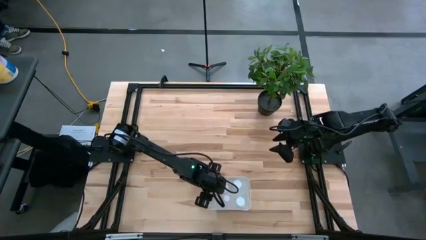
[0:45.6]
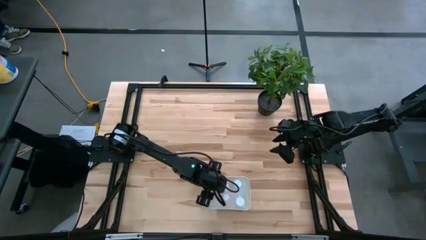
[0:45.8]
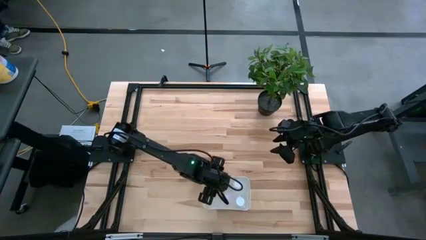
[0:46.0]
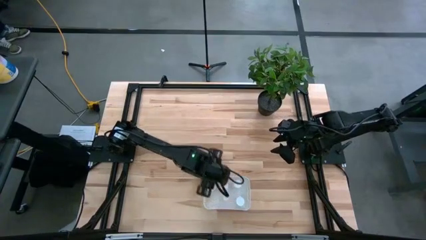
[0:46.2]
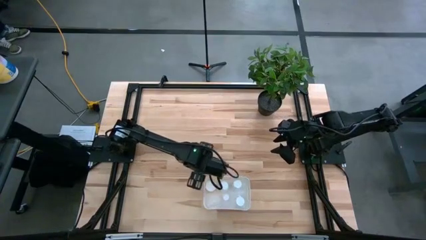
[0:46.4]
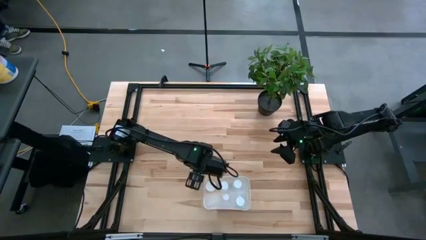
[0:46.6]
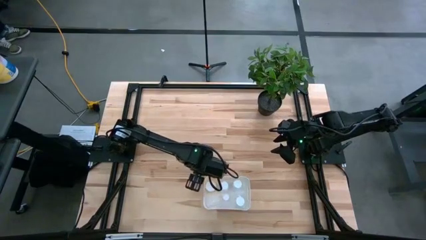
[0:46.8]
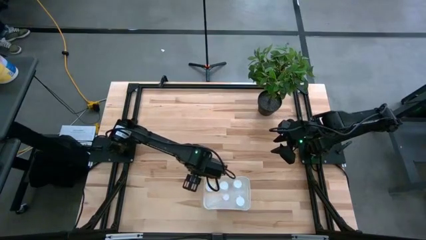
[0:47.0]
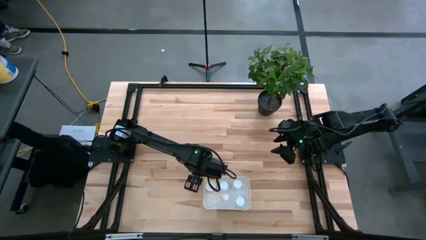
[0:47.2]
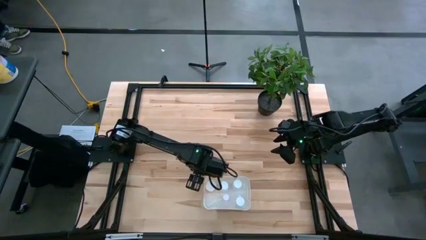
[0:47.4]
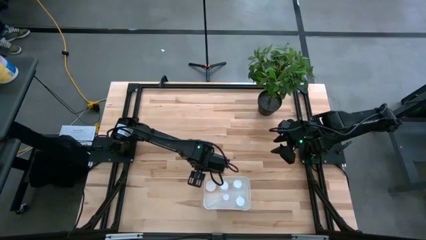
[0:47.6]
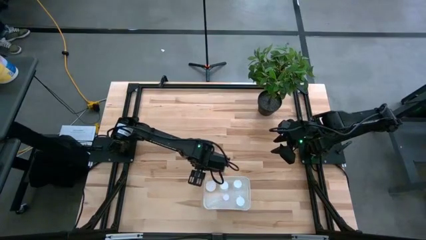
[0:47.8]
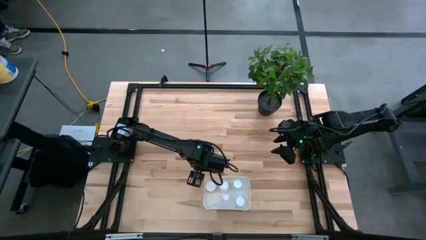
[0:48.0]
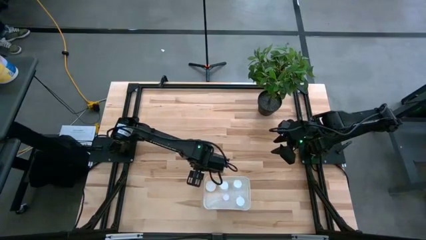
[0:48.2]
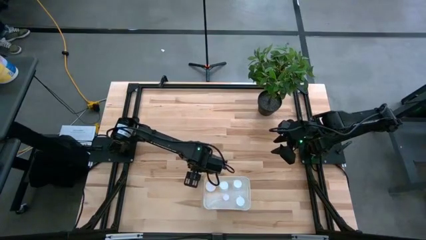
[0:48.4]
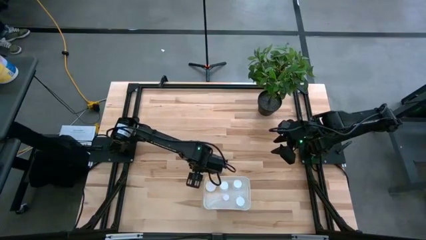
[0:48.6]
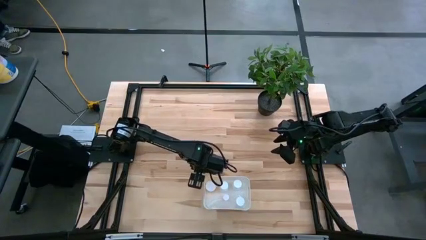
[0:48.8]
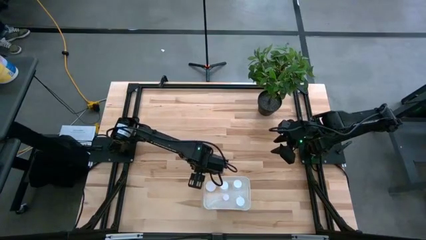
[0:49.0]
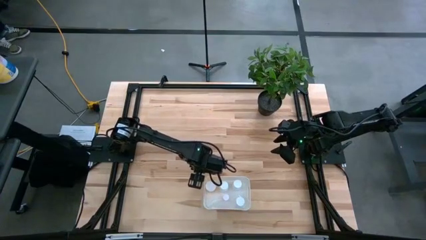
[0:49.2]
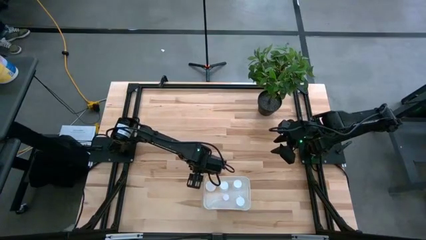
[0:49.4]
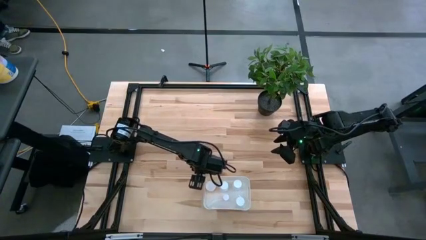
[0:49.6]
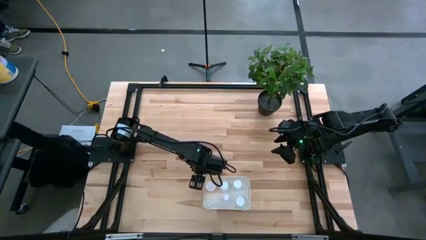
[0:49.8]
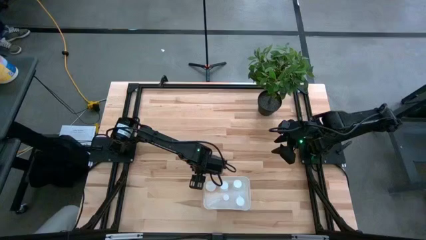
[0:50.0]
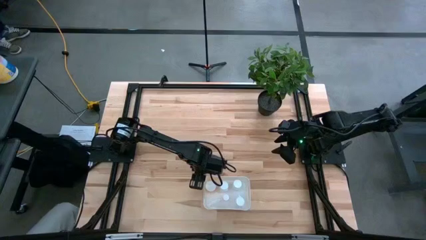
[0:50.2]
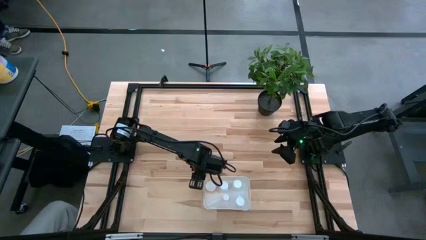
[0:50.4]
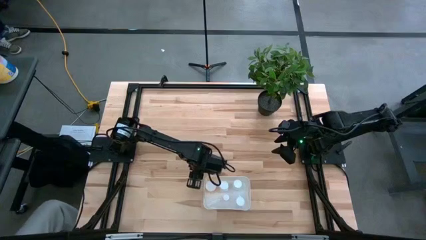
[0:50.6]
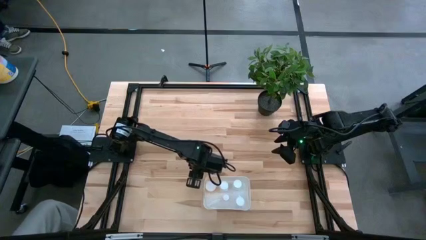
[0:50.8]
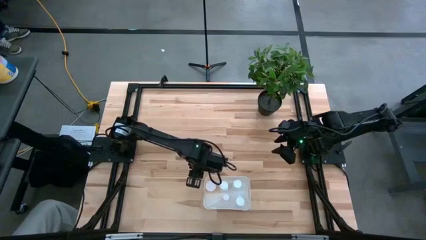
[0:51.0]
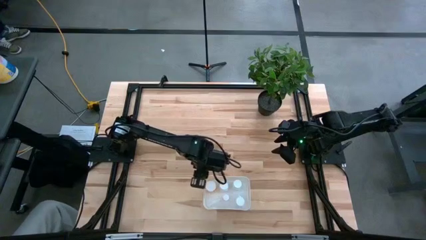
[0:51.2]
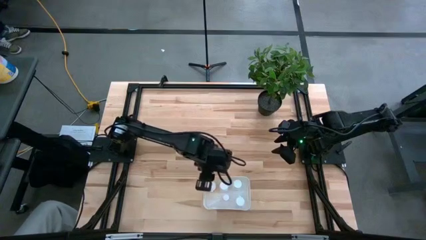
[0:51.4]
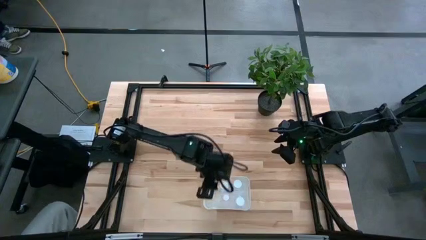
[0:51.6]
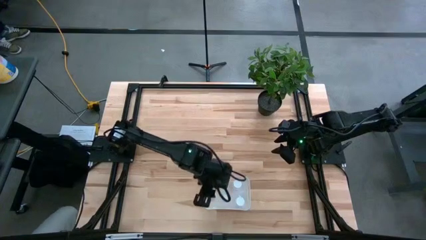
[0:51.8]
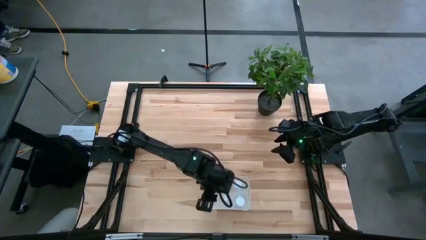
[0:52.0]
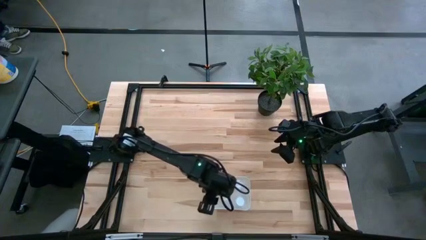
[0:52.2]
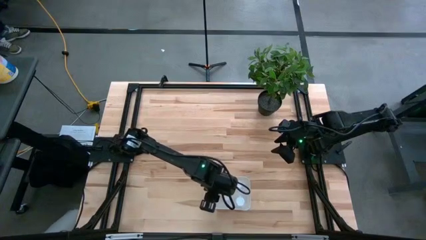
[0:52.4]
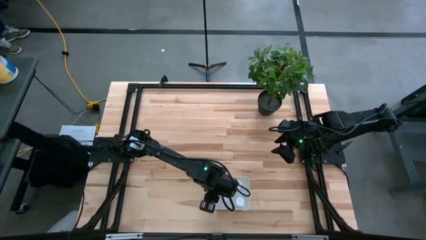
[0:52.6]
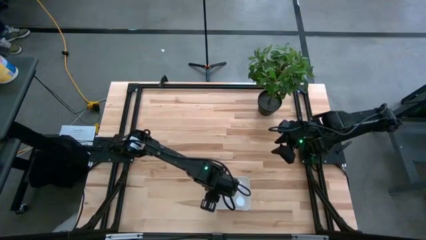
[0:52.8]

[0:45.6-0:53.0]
Task: Pick and place pill bottles into a basket
Put the white pill bottle into the white bin

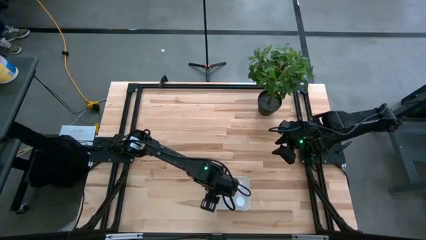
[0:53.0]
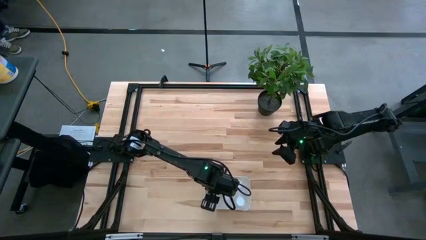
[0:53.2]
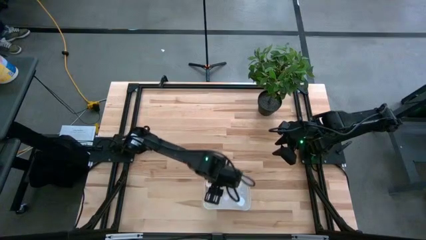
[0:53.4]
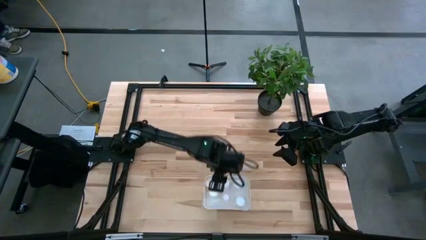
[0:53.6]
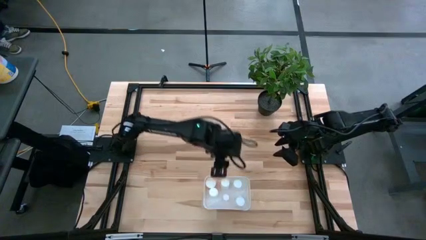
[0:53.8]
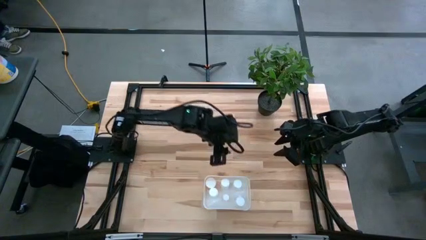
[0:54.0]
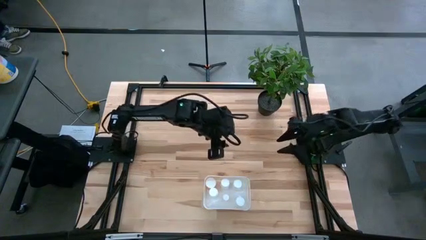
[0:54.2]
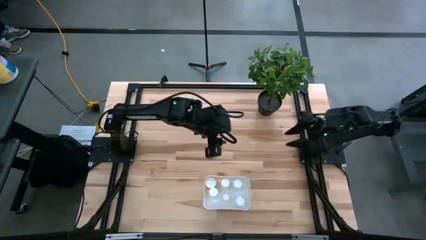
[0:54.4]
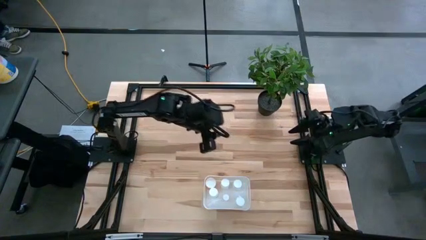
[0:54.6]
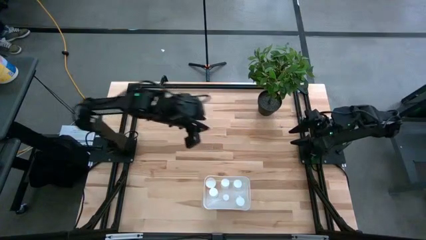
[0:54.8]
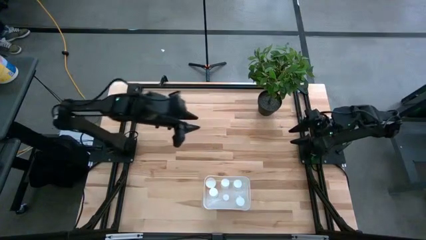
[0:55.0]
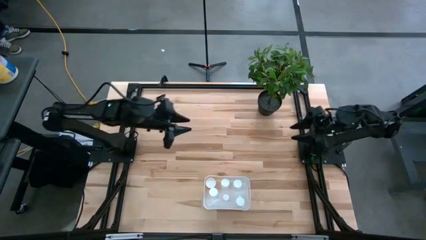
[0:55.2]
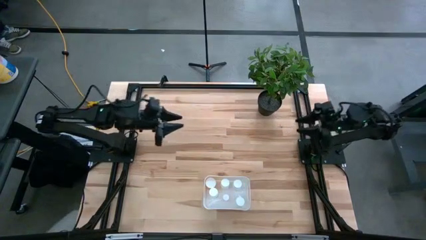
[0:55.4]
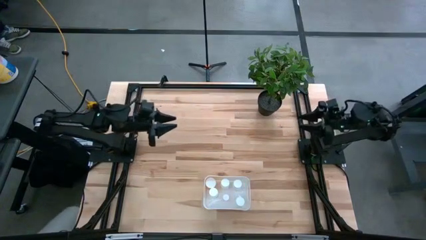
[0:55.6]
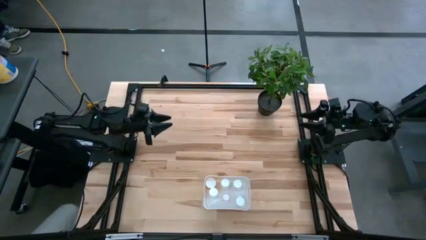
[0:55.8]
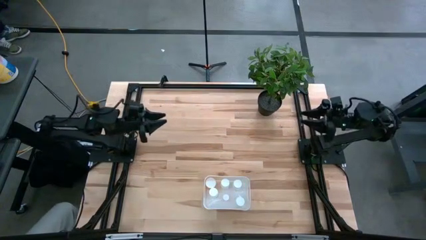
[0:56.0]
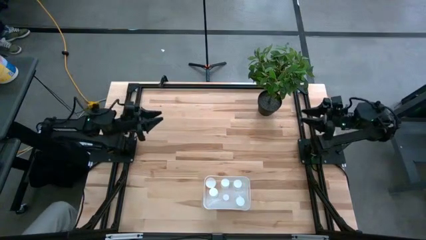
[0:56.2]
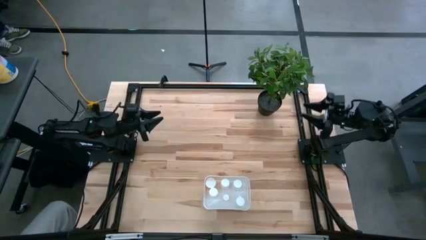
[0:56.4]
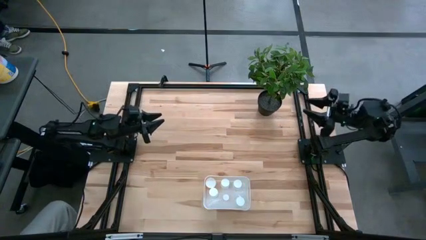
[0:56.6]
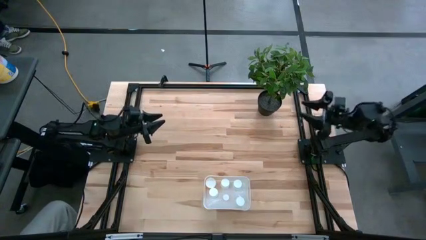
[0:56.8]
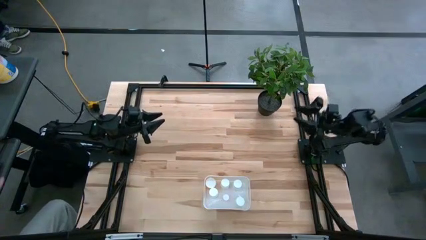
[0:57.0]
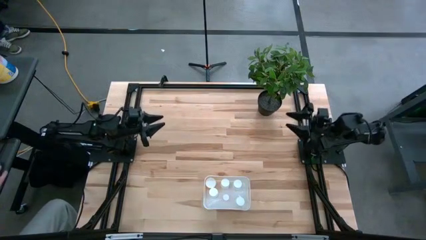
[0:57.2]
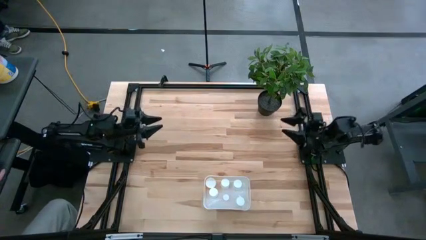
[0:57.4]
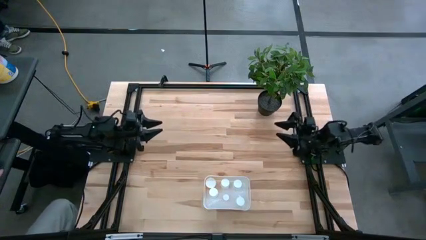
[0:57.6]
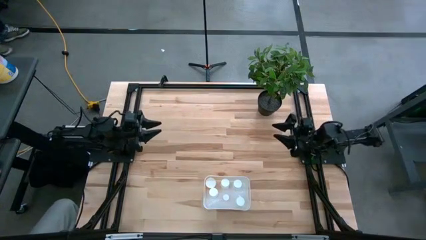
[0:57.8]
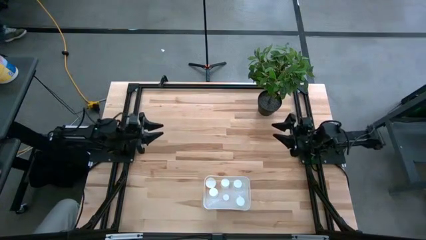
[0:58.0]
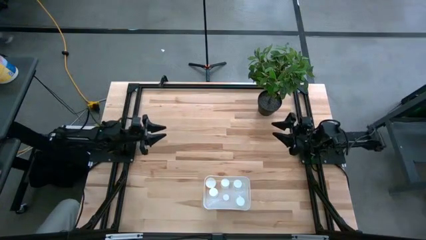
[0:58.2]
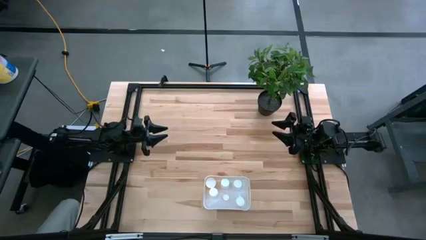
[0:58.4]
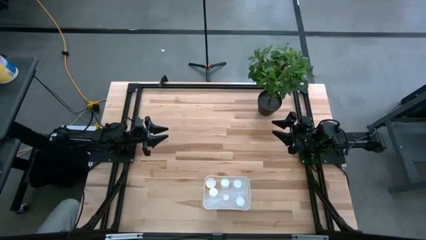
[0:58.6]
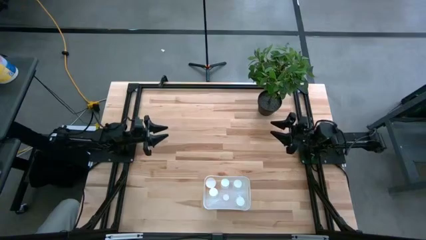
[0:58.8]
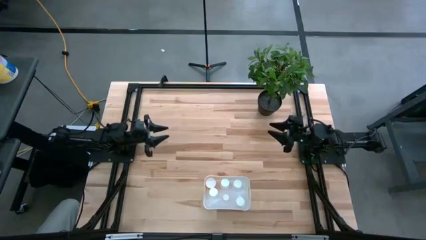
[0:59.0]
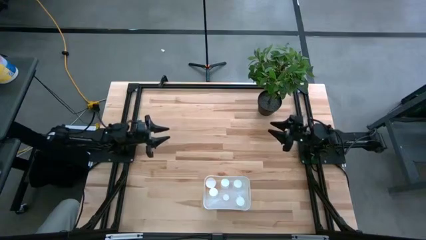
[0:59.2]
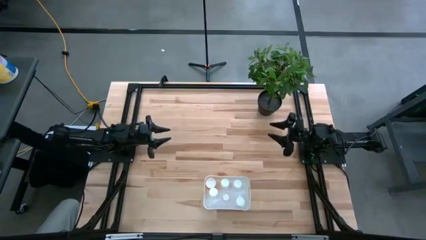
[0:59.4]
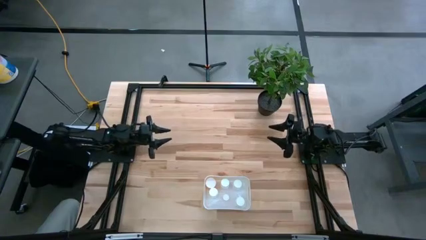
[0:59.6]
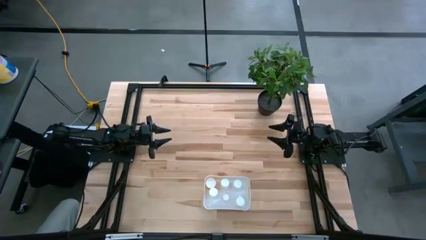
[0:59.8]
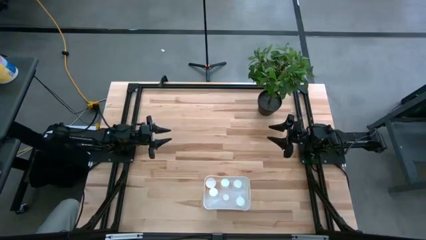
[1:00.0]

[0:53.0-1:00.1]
Return to Home Position

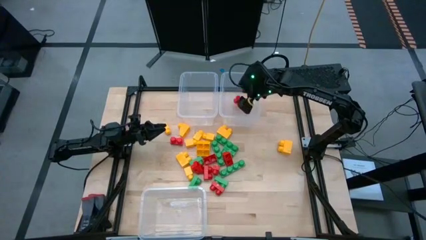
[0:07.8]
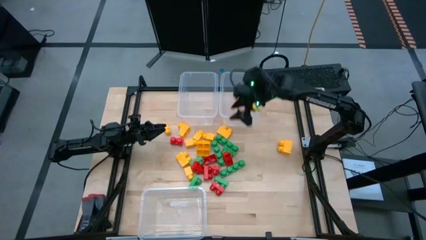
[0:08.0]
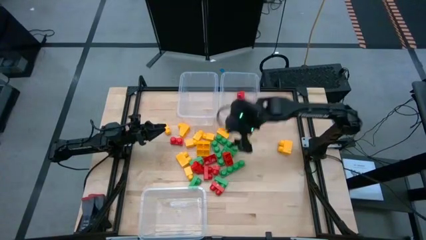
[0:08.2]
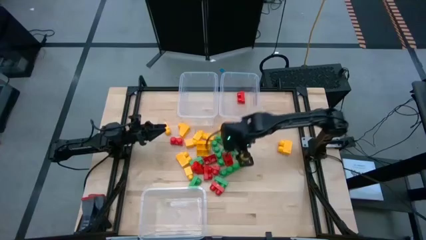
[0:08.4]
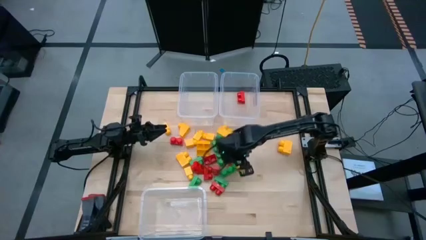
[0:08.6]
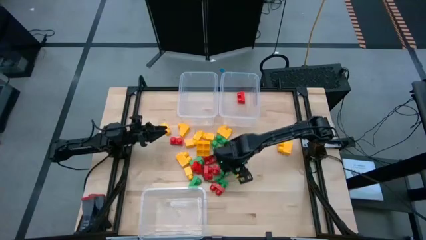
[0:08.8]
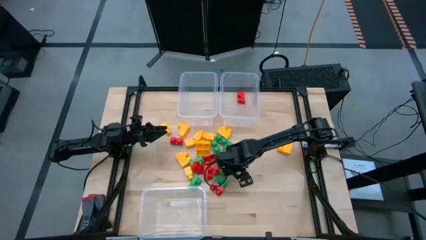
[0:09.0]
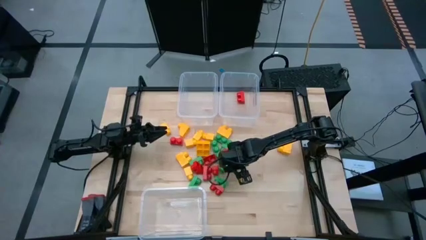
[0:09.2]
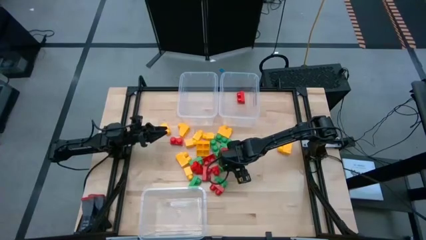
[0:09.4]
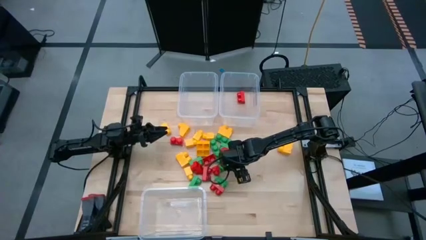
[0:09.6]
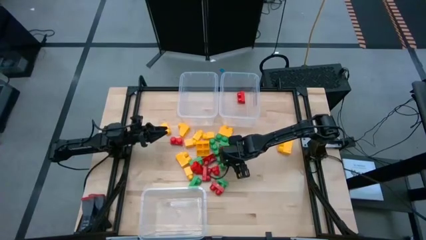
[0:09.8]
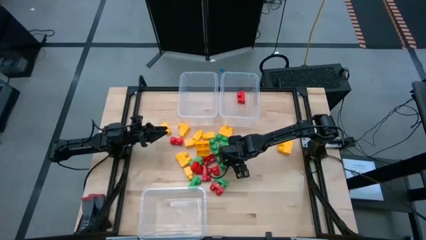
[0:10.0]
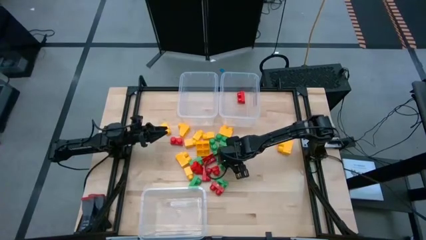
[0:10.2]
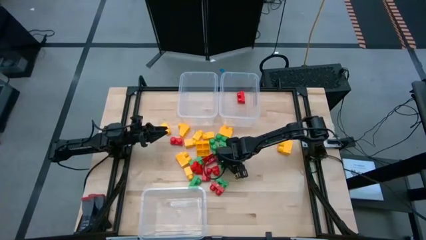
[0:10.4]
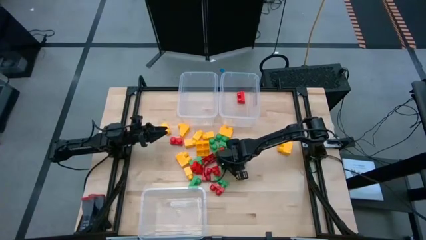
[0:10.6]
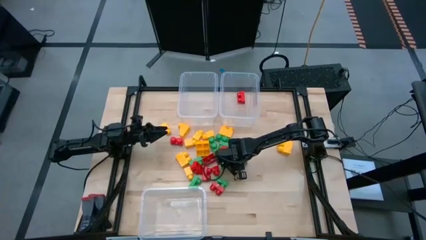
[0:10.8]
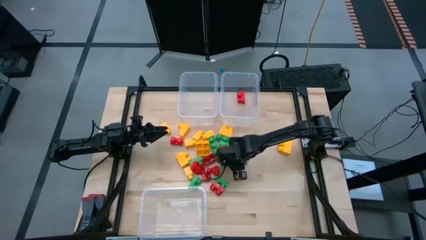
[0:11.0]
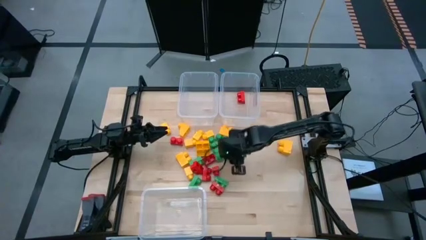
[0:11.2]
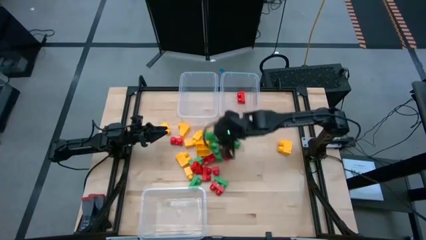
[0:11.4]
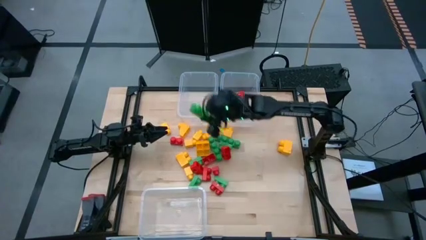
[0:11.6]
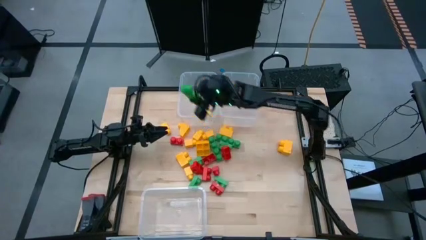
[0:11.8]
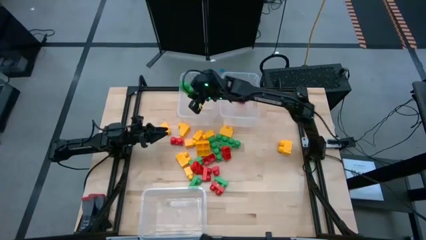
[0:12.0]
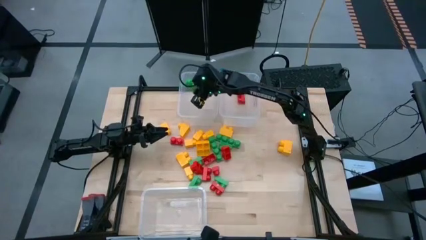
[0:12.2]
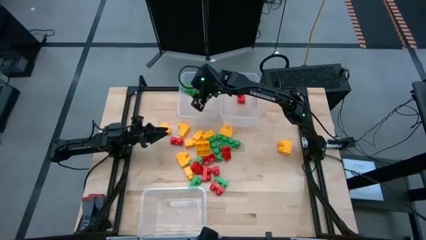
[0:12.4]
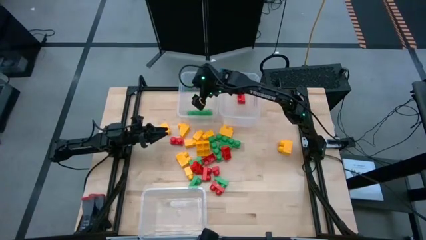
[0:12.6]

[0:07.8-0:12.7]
Task: Sort blocks
Put the green game piece into the top left transparent bin
